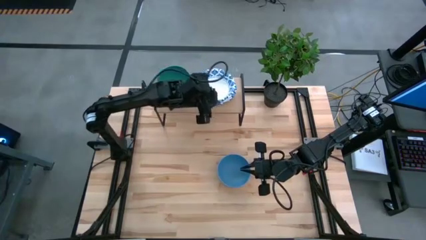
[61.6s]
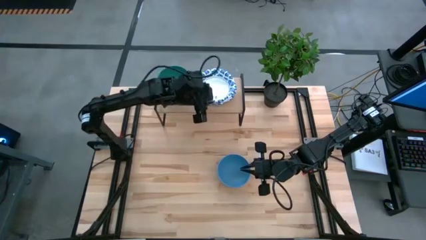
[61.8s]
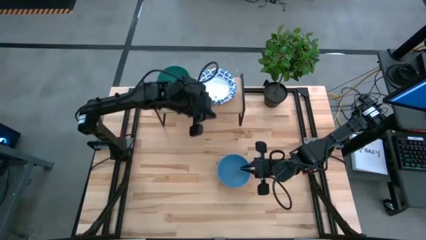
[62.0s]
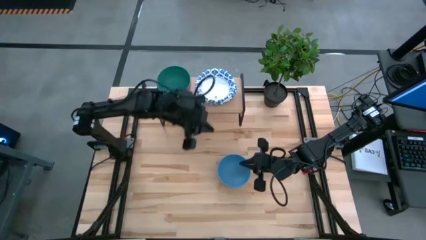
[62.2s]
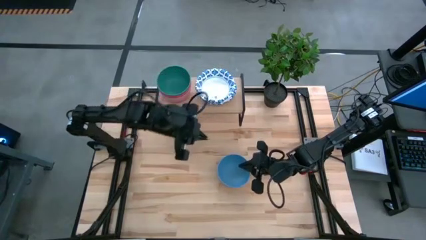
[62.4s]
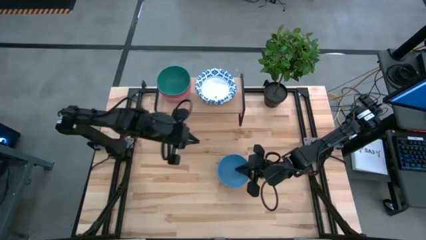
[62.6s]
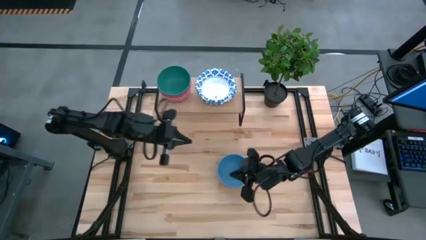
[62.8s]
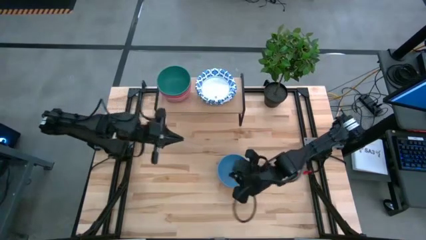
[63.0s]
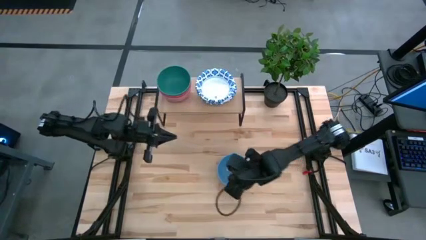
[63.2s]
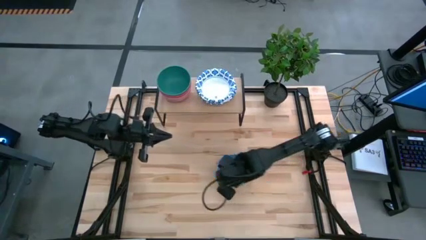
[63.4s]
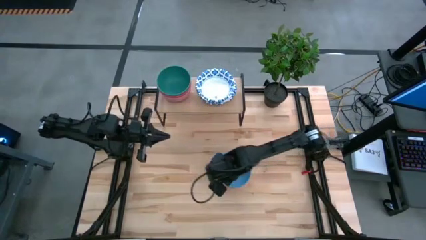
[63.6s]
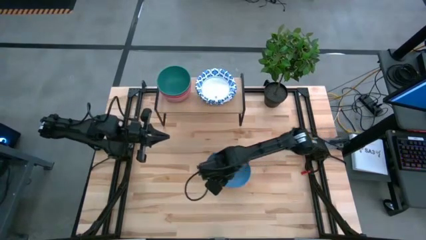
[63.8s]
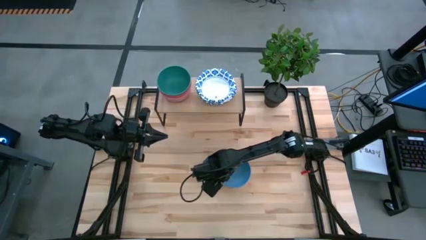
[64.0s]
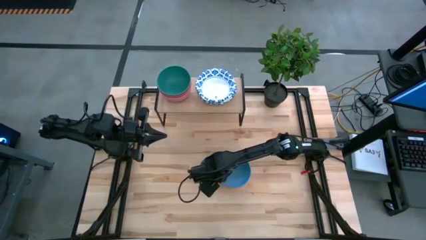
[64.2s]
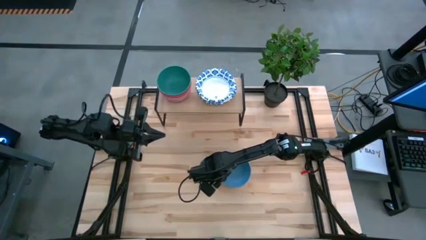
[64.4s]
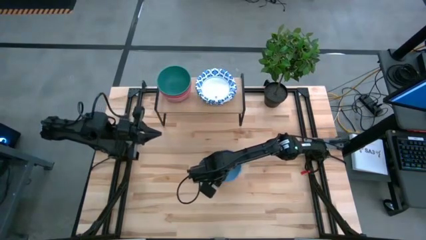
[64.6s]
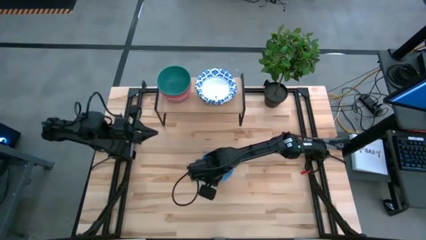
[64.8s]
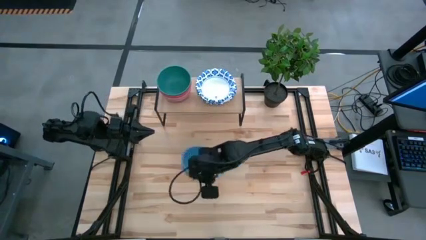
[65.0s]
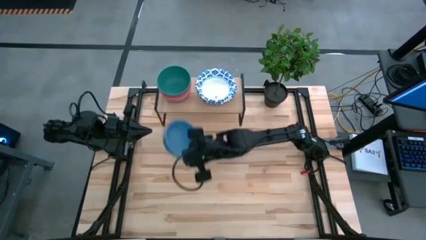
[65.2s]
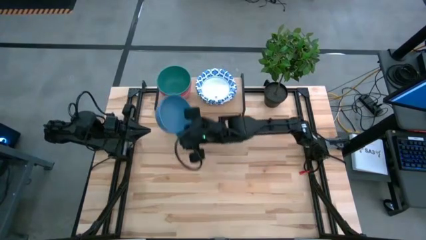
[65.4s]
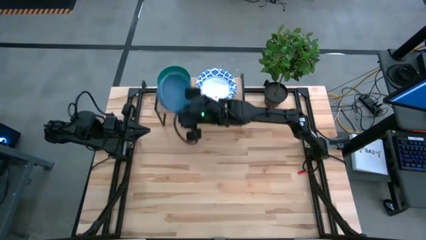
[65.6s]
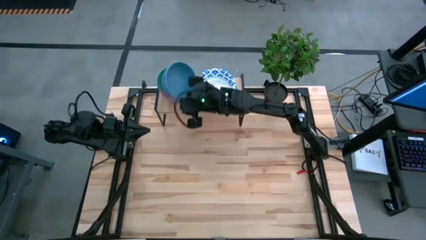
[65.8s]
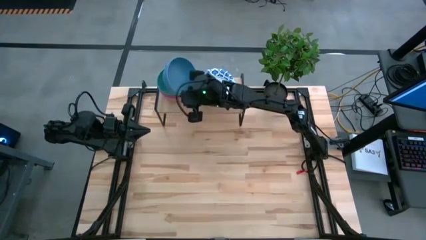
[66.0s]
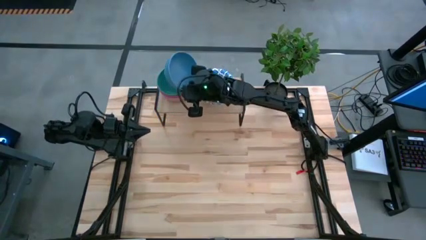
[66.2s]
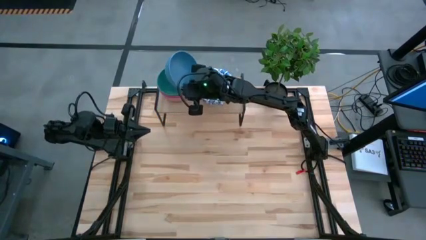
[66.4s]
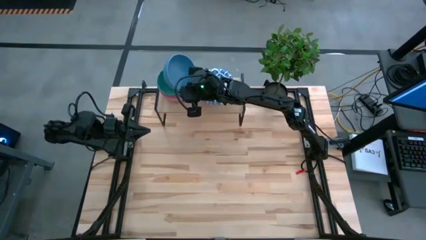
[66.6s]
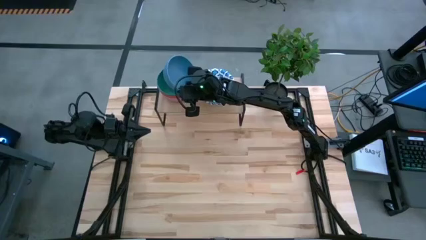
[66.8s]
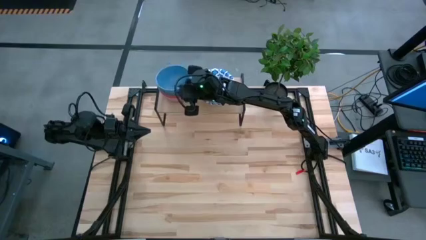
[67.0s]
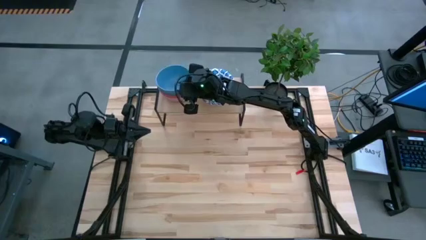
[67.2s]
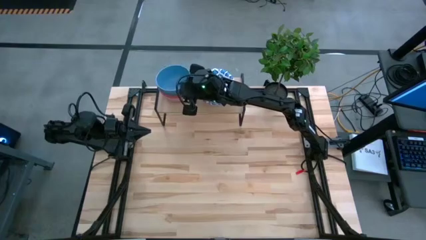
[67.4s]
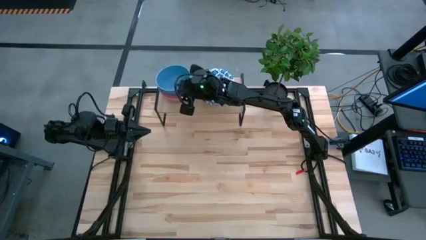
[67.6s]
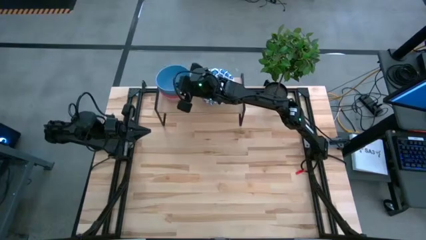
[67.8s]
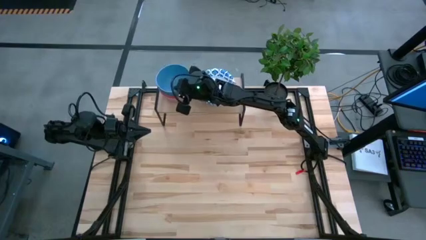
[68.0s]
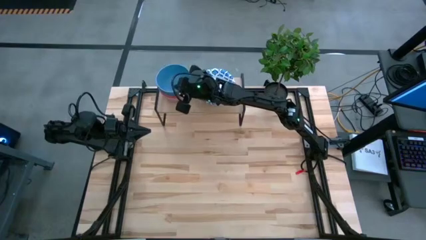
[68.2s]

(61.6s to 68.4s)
Task: Place and stack bowls onto a shelf
Stack the blue bowl on the green bowl on the shelf

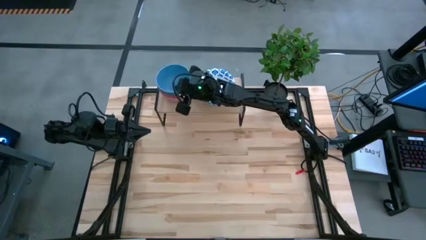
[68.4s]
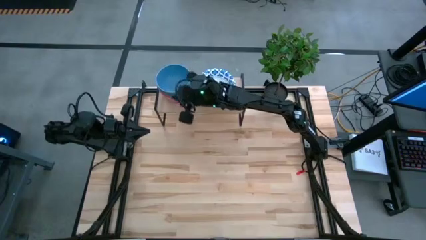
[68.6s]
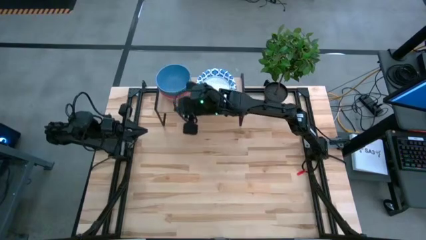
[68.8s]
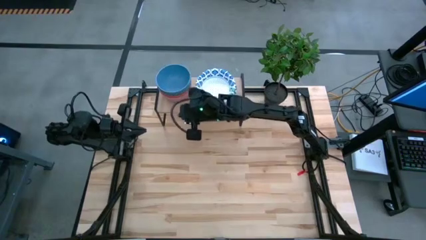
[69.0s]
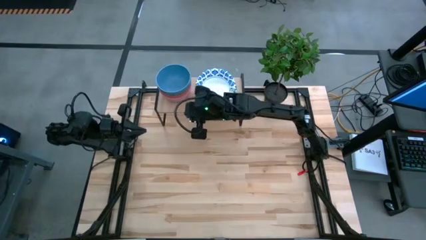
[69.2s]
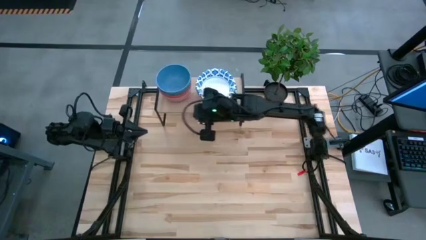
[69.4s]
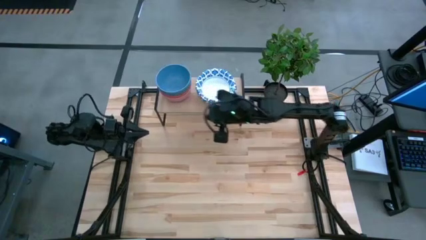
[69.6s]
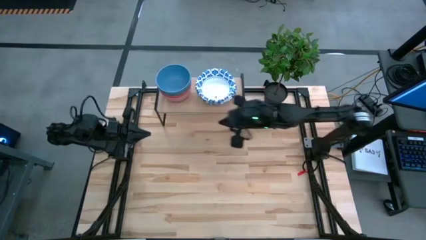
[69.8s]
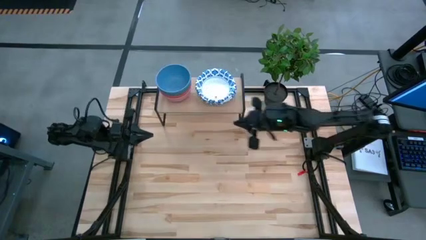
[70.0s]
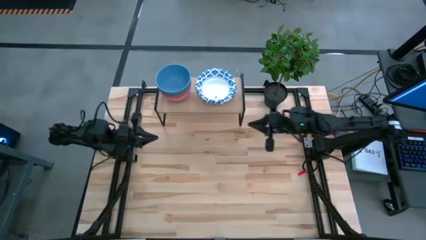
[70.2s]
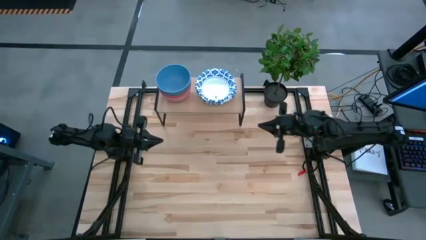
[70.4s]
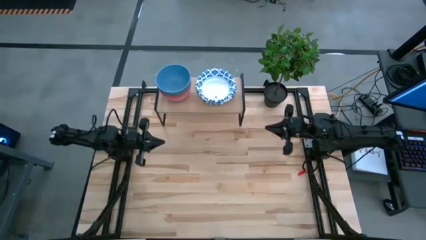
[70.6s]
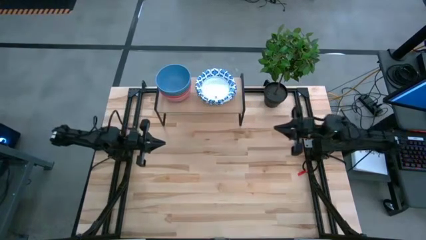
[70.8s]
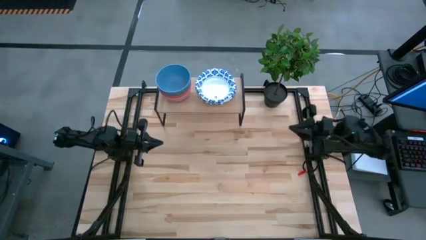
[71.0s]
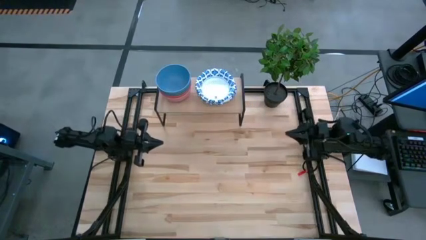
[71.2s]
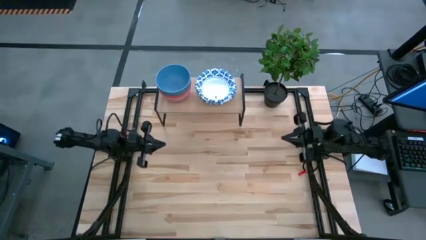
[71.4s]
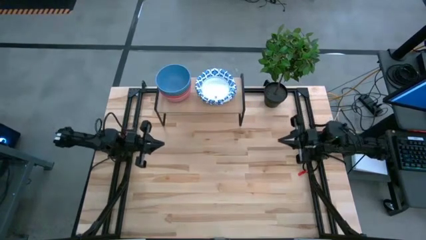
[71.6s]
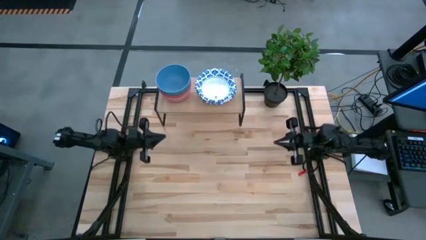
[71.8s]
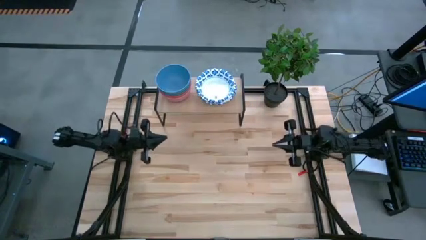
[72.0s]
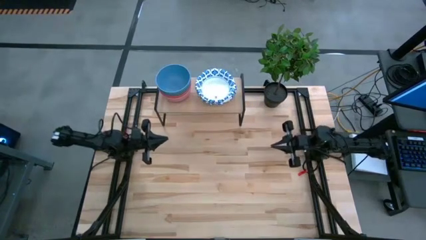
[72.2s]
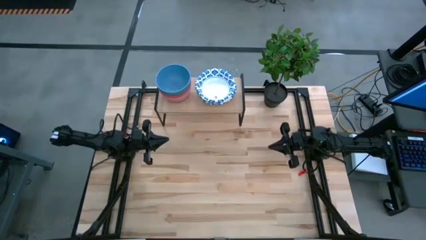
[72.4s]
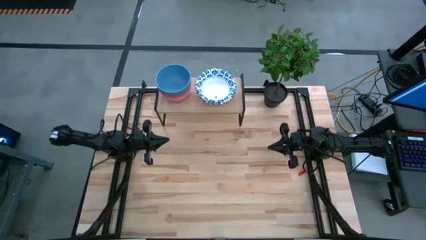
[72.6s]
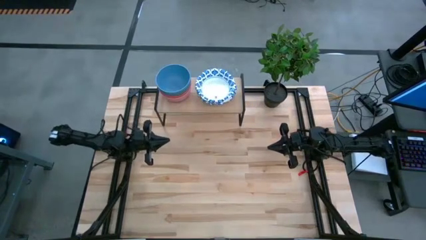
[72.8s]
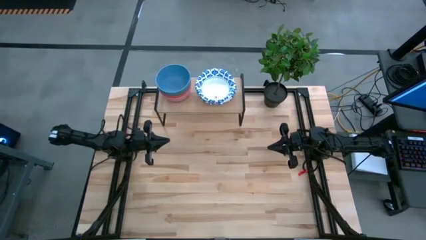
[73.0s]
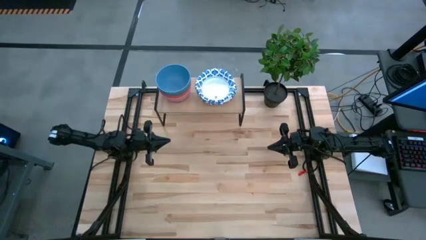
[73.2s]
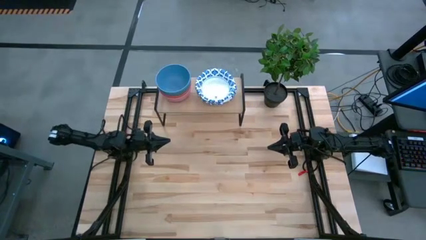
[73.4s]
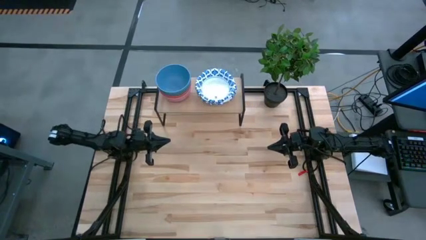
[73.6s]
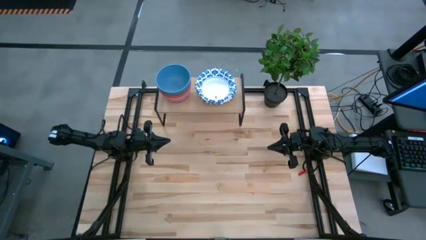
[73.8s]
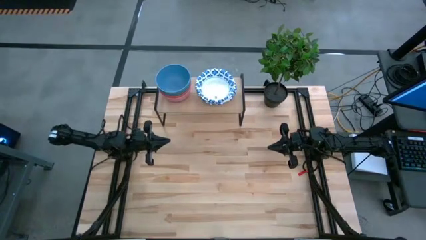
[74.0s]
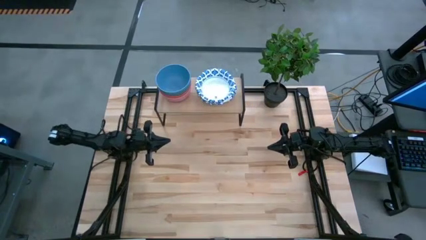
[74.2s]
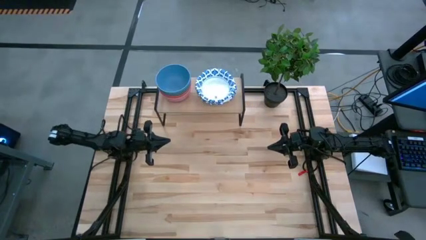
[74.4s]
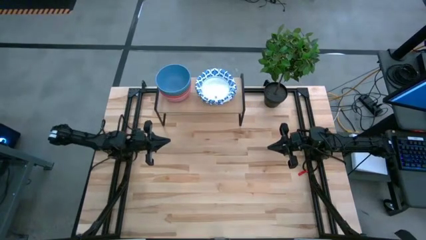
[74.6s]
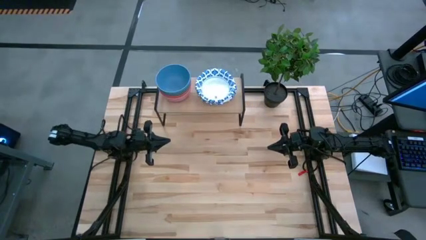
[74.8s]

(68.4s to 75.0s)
Return to Home Position

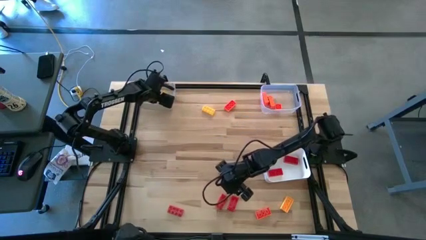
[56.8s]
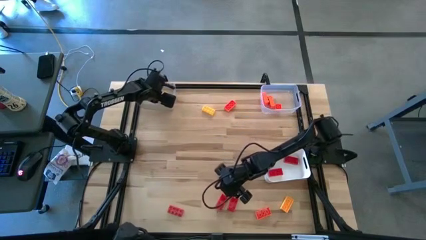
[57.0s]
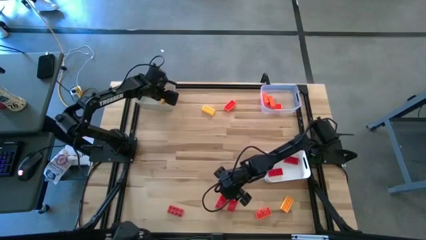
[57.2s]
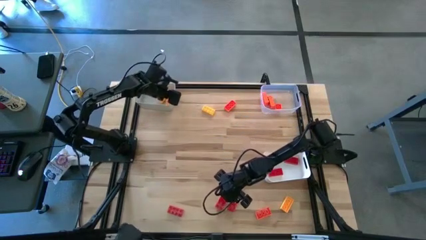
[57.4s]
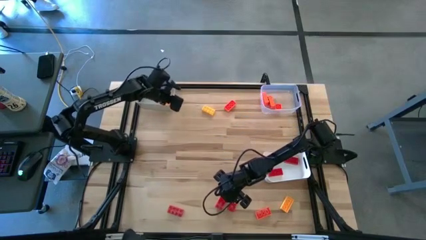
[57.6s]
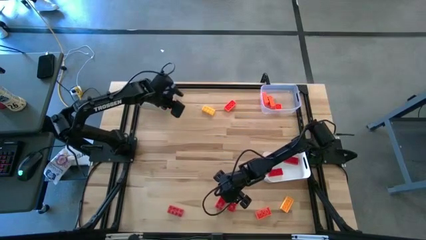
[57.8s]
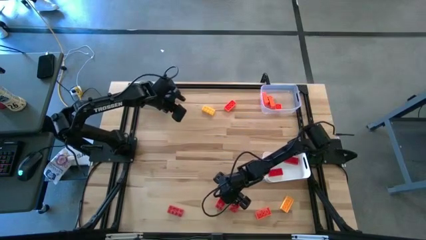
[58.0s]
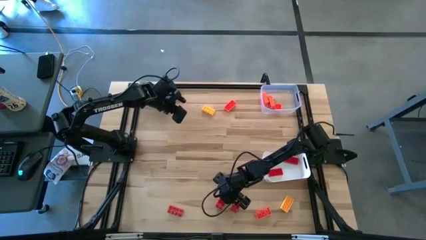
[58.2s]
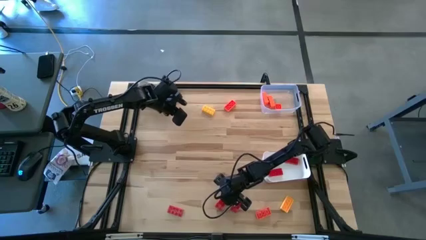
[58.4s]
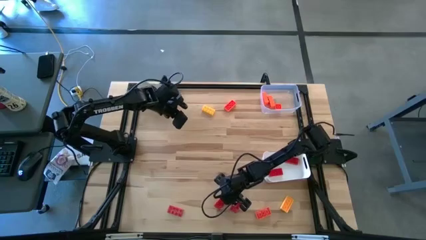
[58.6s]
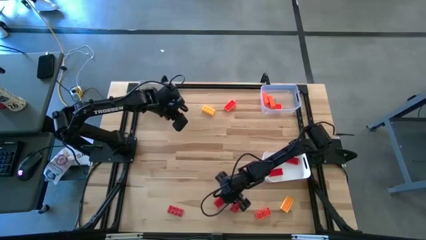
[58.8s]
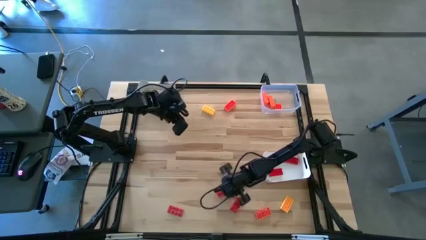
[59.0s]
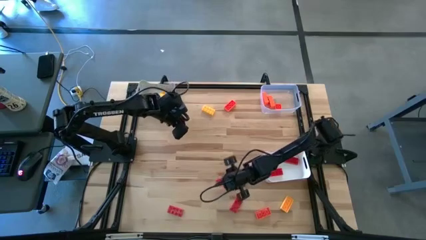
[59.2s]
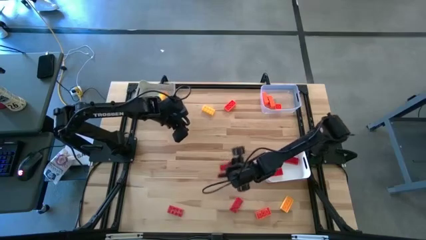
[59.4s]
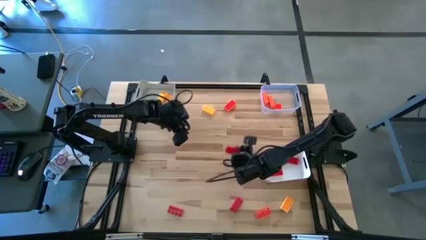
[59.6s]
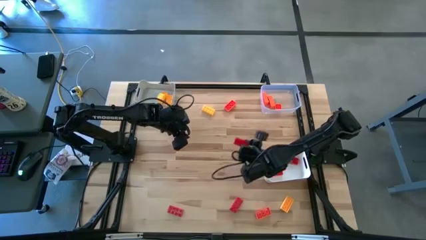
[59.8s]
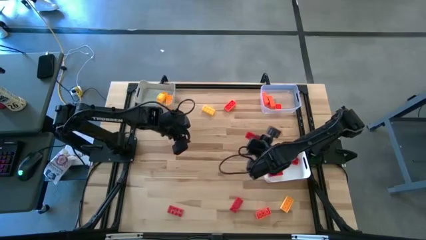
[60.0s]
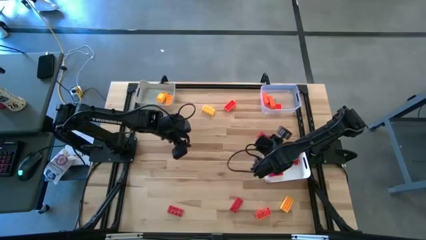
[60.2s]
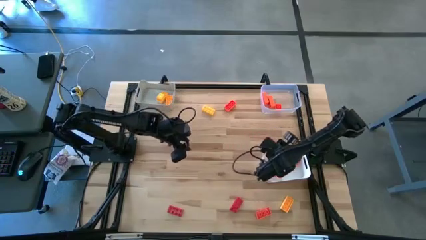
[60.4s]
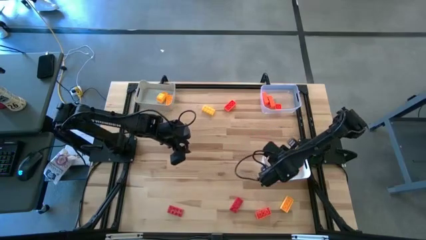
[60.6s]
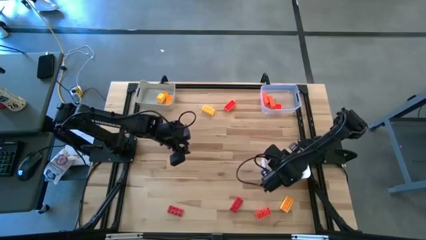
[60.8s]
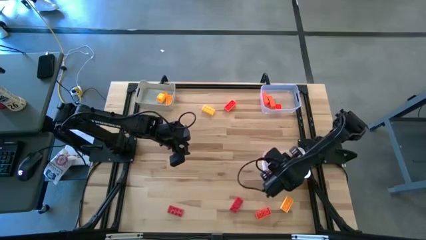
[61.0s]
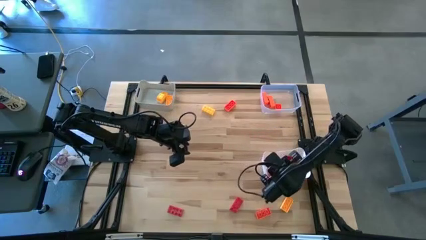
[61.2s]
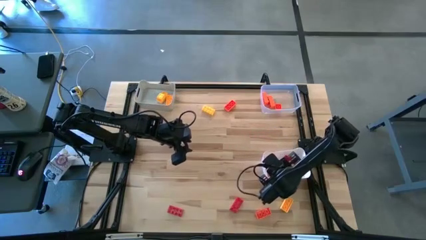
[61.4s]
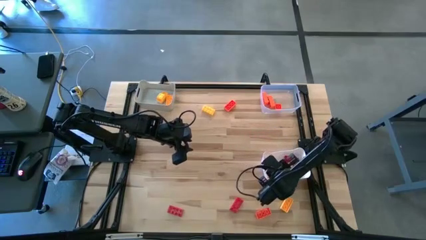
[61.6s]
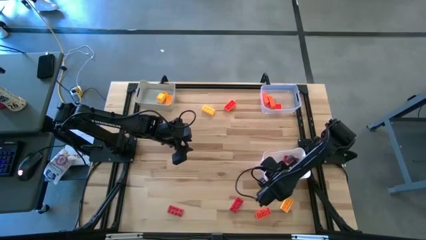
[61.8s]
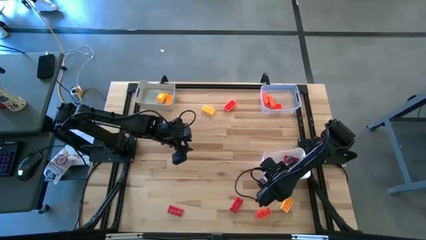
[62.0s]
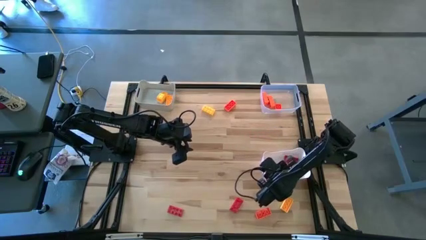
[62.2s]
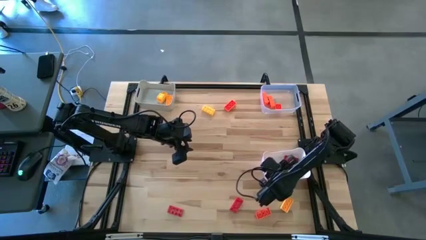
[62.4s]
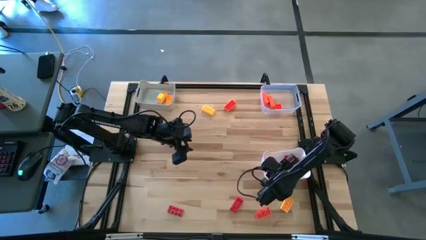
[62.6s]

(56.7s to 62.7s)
Task: Sort & place blocks by color
Put the red block into the white bin
